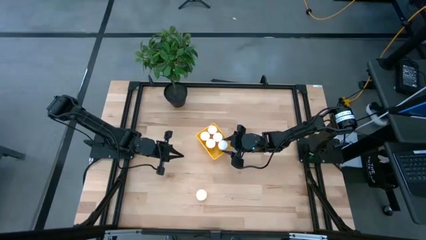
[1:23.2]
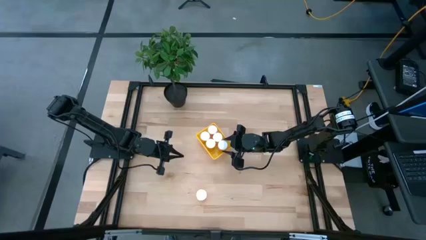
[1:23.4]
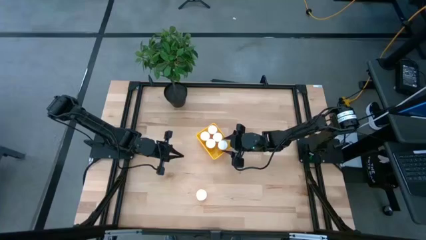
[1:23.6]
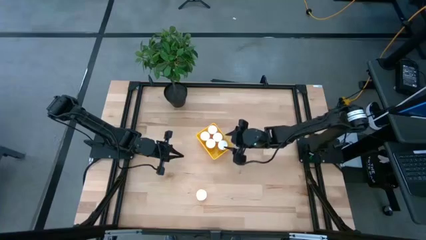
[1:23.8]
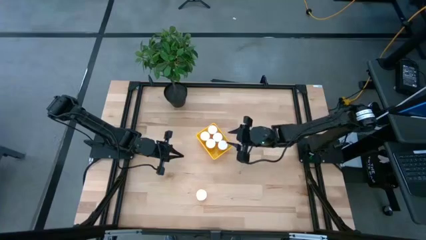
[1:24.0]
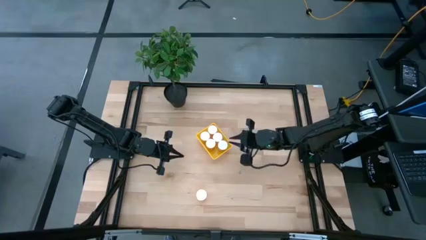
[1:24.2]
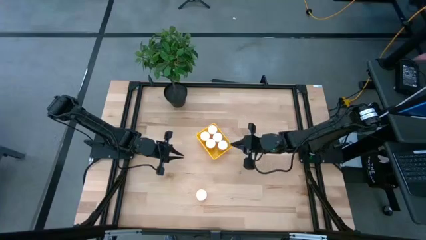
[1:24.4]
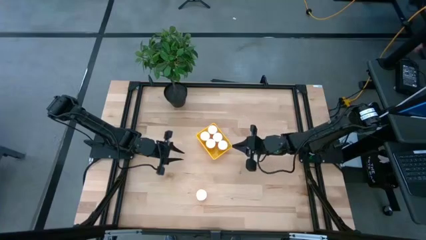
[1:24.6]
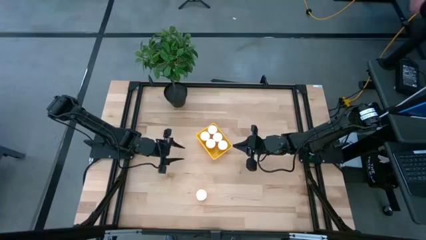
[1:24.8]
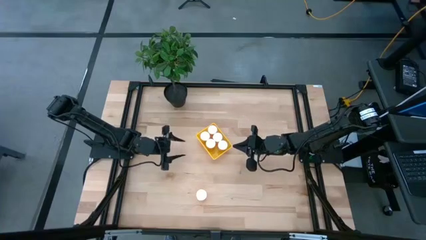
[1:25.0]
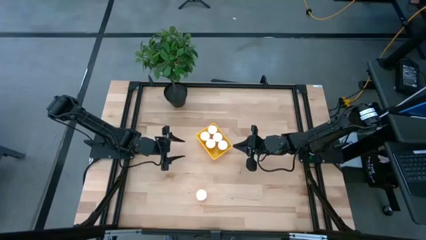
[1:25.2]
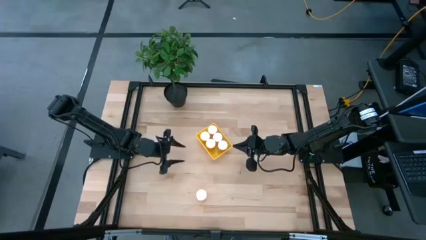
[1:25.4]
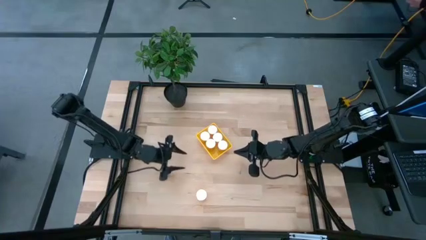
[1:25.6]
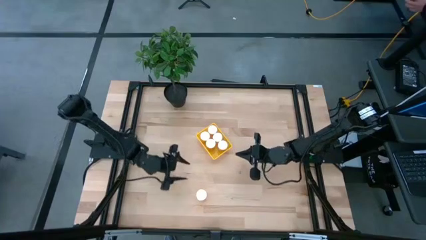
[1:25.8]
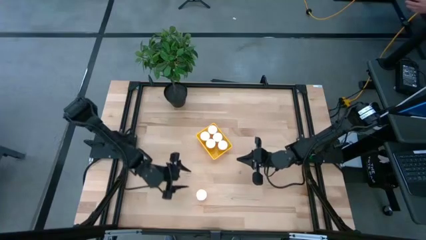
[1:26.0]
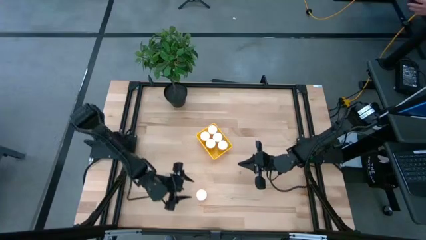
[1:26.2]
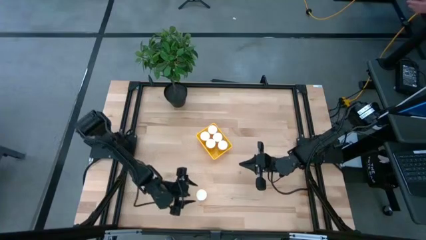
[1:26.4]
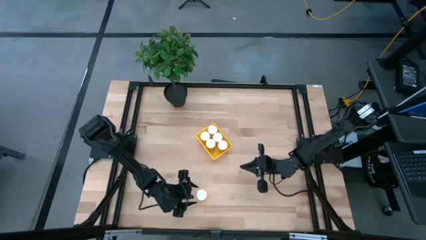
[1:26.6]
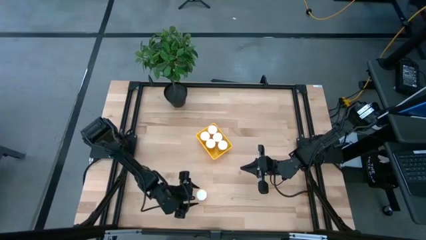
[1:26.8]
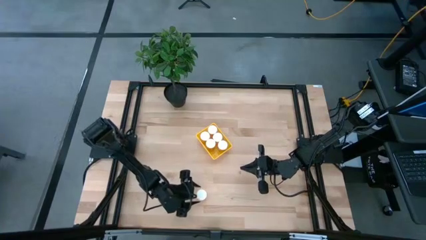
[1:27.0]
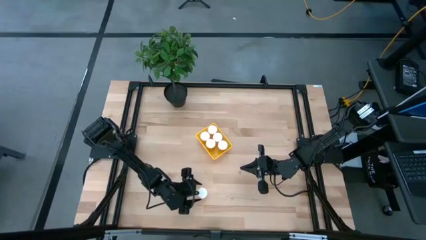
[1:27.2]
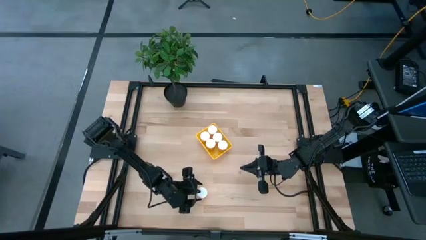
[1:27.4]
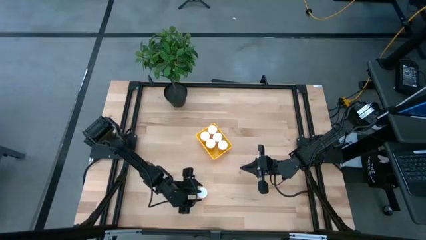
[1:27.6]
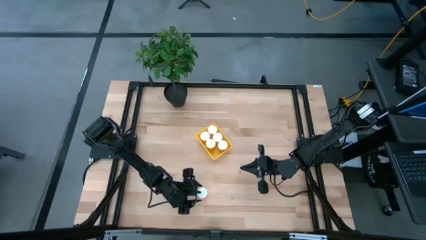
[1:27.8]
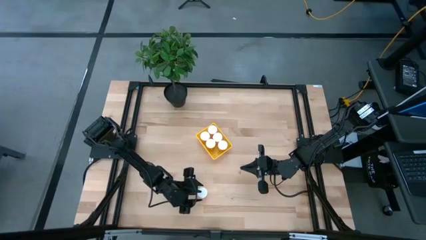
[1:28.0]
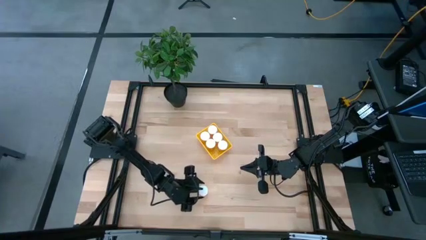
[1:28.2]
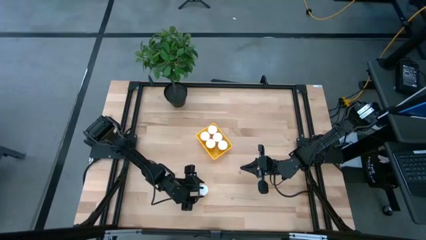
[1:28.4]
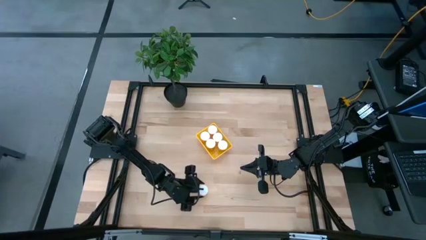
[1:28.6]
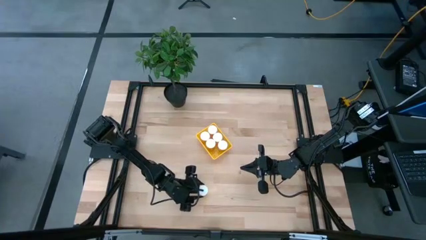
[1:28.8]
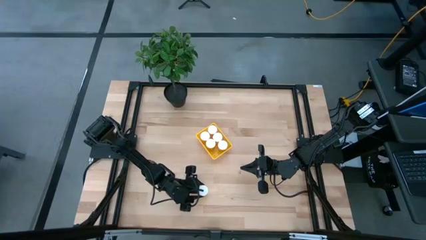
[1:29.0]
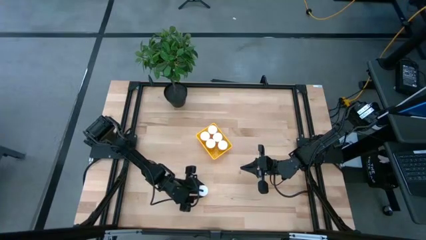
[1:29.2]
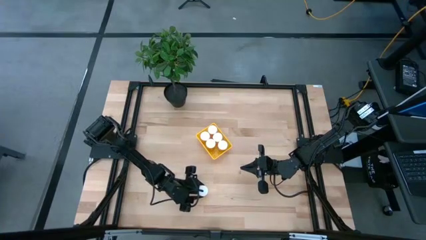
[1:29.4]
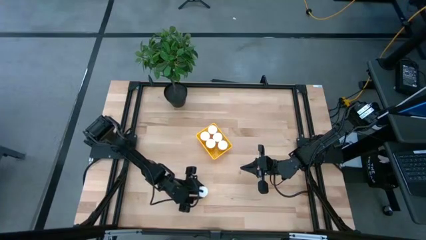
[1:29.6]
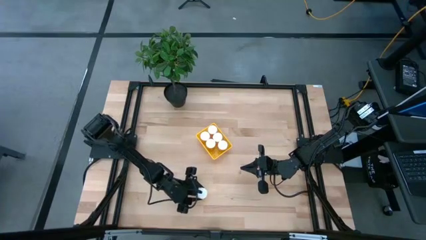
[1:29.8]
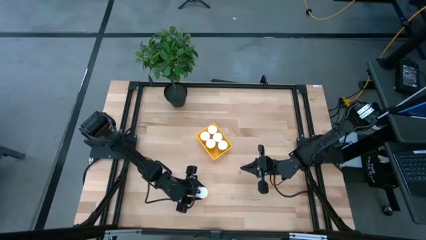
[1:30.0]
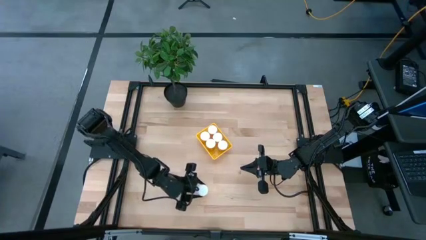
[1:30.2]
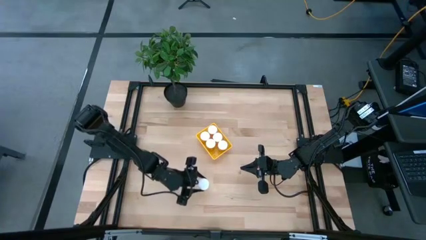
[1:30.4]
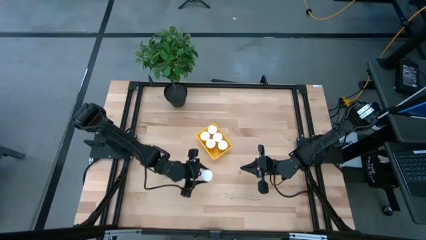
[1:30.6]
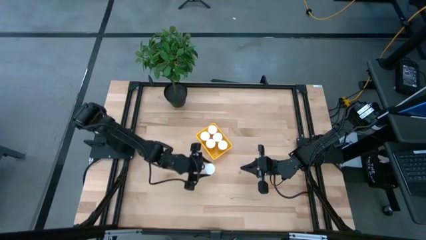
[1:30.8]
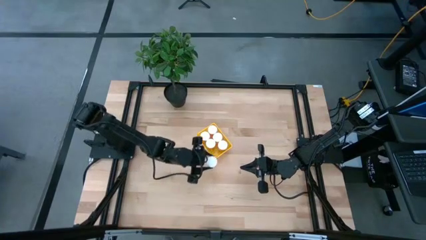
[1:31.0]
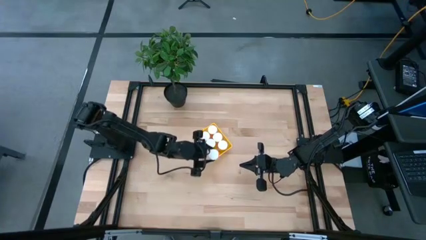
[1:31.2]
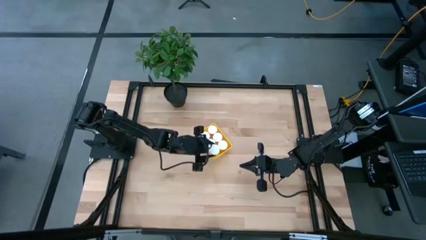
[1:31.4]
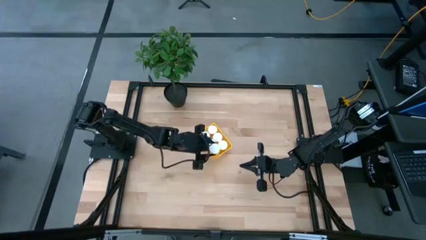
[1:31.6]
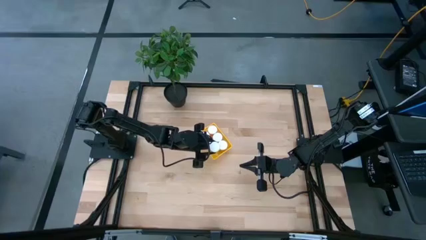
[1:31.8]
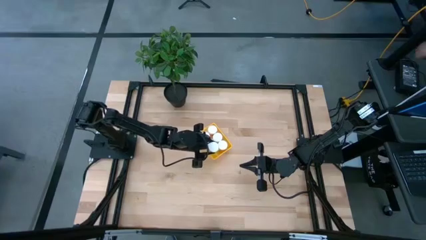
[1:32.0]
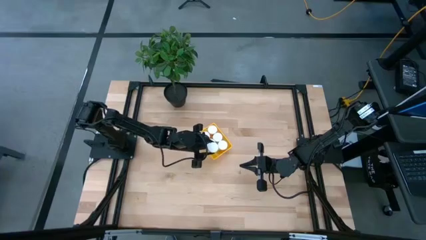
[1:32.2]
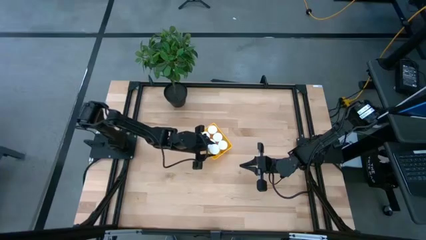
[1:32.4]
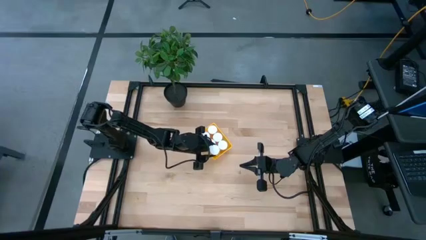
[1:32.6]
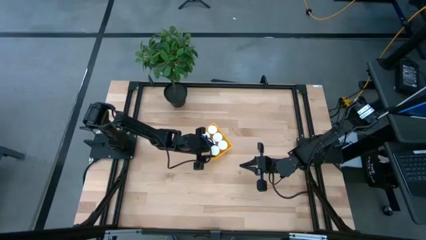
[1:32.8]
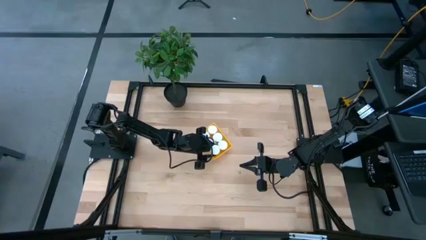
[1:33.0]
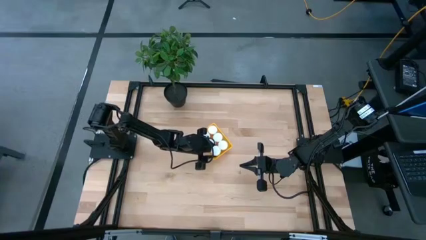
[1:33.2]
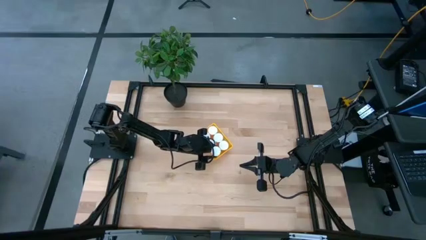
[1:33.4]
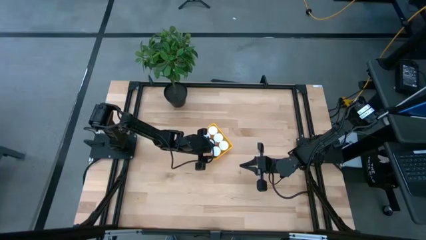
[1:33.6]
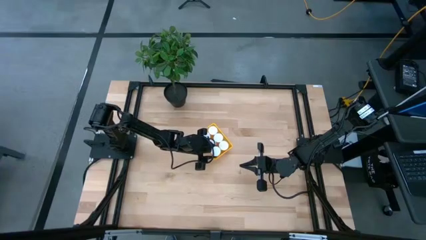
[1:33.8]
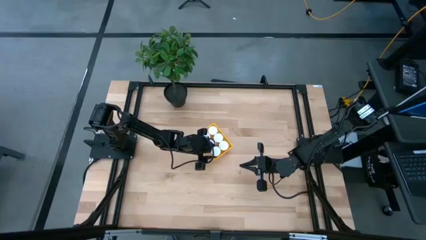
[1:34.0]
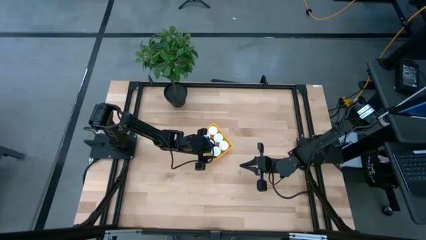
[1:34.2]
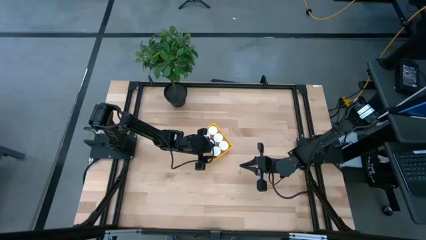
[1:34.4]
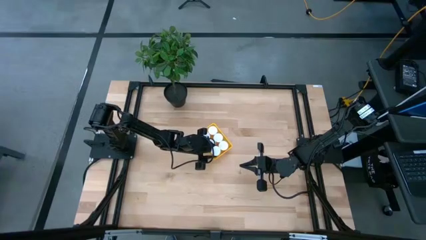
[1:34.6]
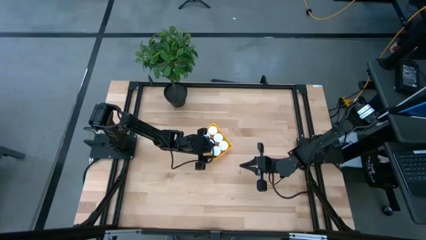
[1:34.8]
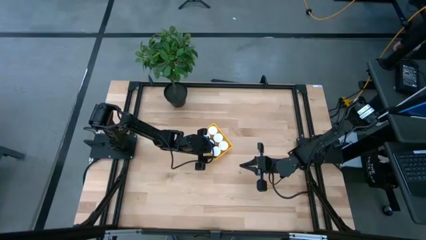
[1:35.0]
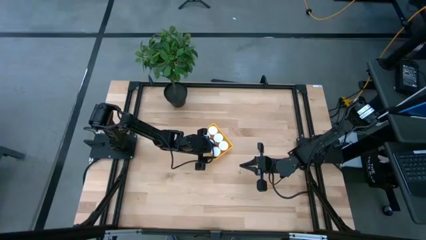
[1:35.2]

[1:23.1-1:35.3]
Task: Pick and place pill bottles into a basket
Put the pill bottle into the bin

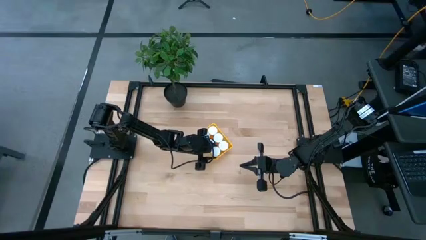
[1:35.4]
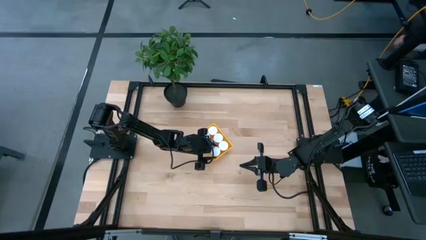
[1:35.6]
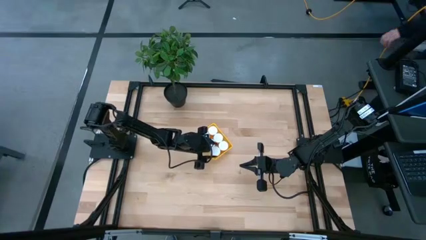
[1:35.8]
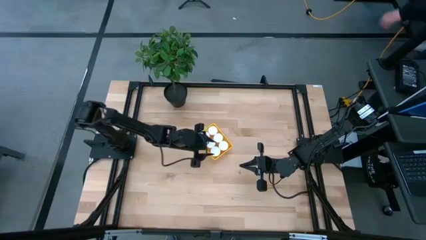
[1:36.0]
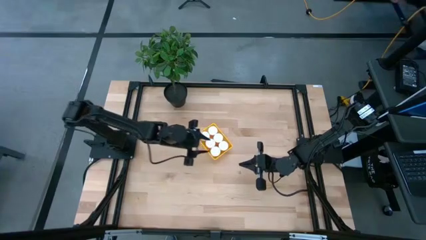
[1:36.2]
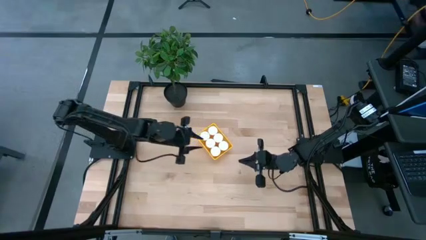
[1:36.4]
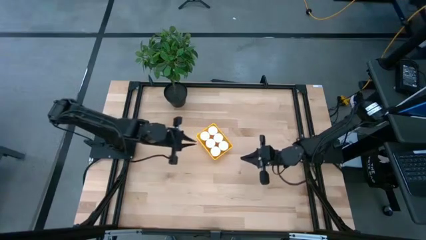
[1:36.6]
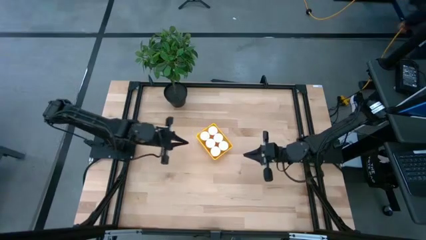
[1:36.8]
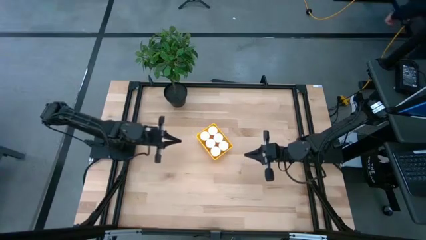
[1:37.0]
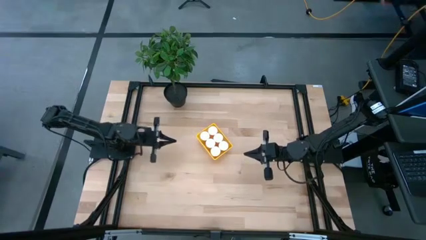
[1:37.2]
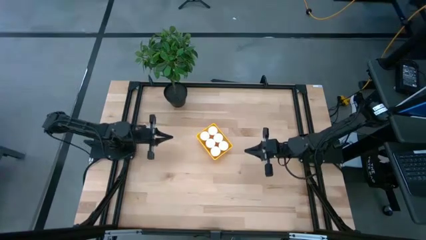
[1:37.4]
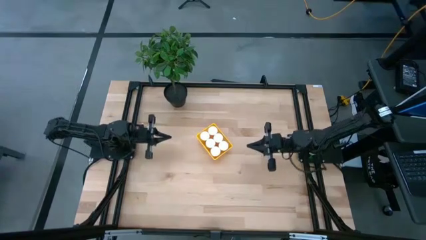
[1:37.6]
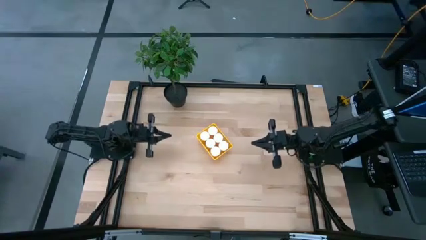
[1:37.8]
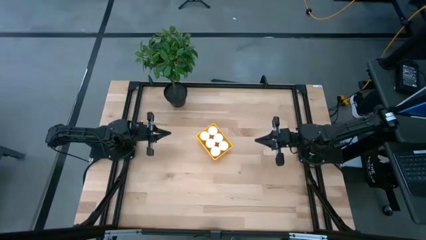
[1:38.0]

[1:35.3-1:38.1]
Return to Home Position

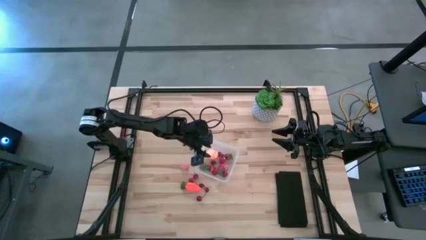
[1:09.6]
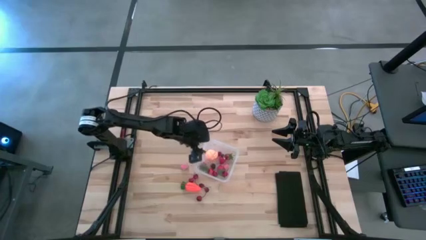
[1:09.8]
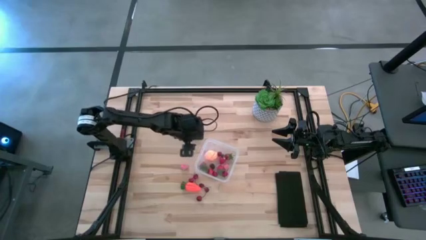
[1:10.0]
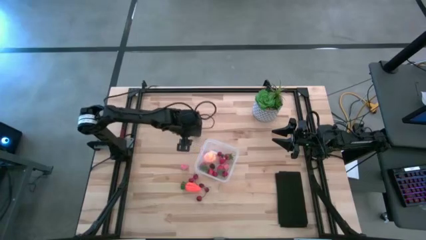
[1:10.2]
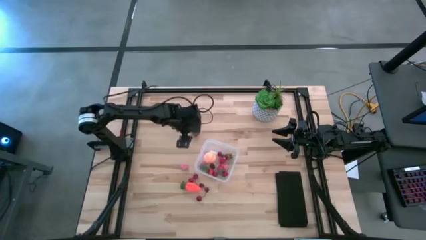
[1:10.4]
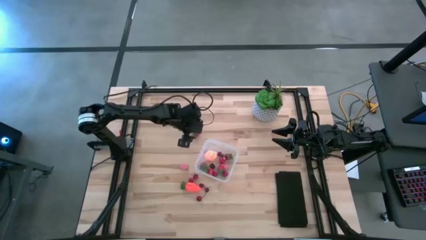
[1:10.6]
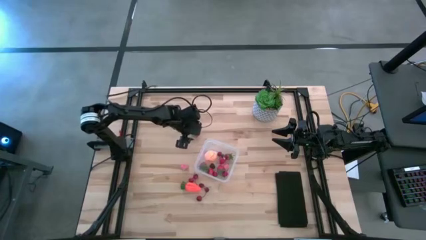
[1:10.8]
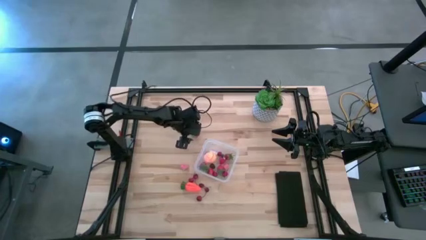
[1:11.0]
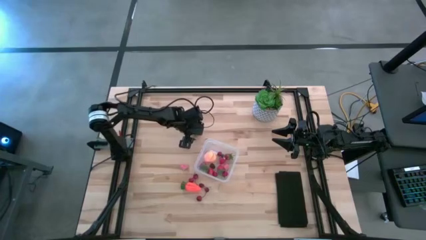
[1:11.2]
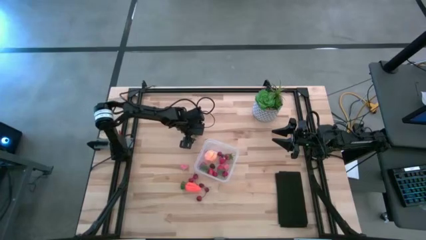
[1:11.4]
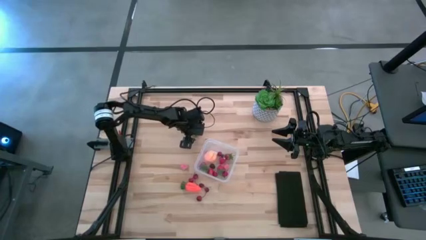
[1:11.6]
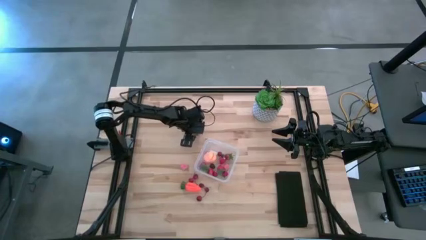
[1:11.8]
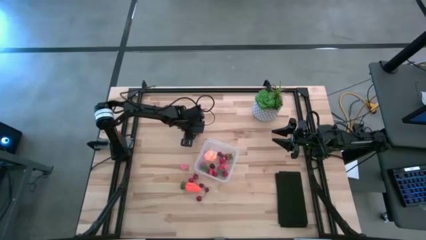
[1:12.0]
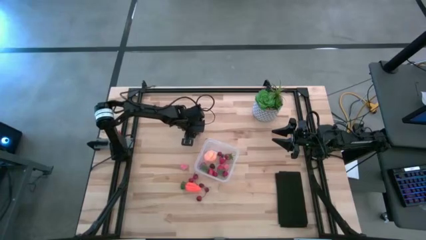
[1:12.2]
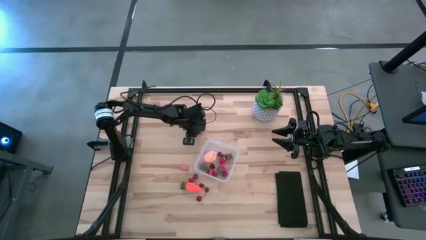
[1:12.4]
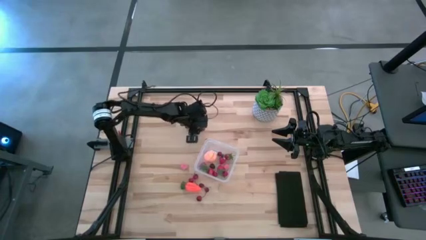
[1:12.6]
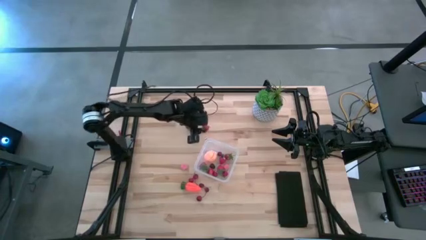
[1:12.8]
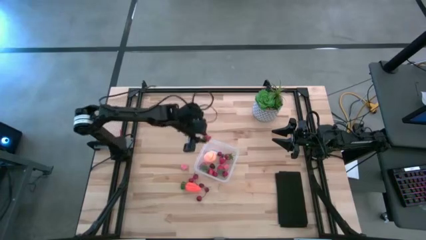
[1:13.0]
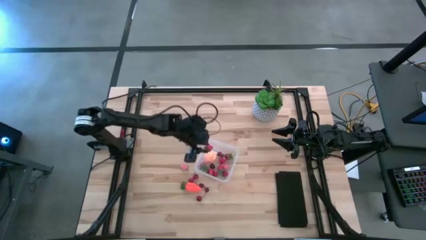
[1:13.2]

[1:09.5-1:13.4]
Task: Pick and placing Produce into tupperware
Put the red strawberry into the transparent container
